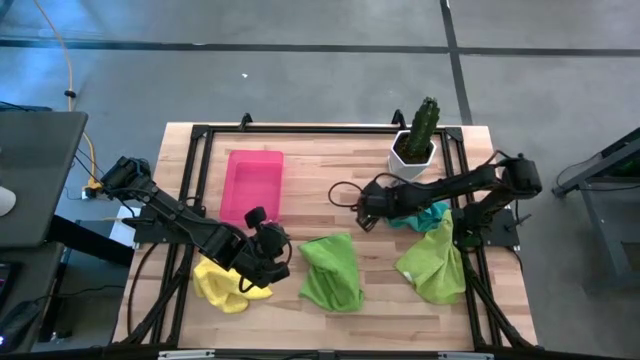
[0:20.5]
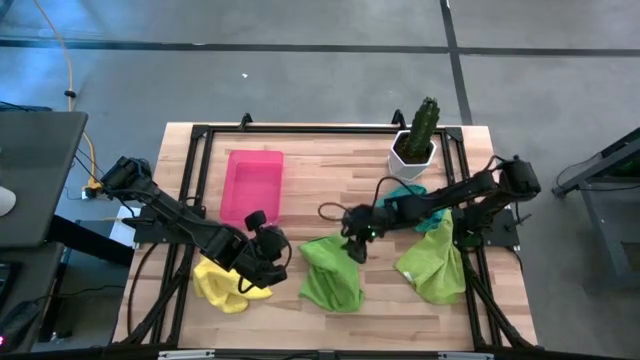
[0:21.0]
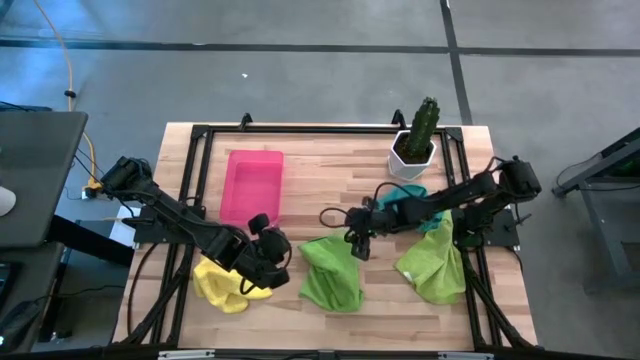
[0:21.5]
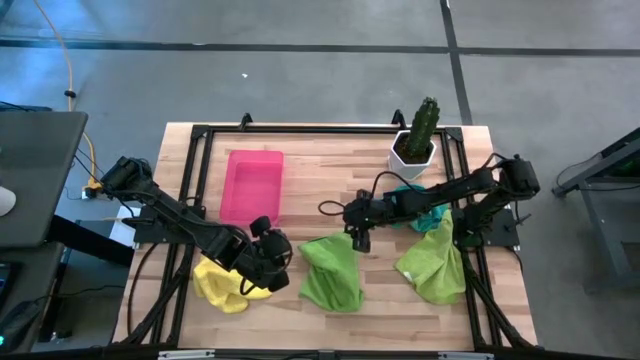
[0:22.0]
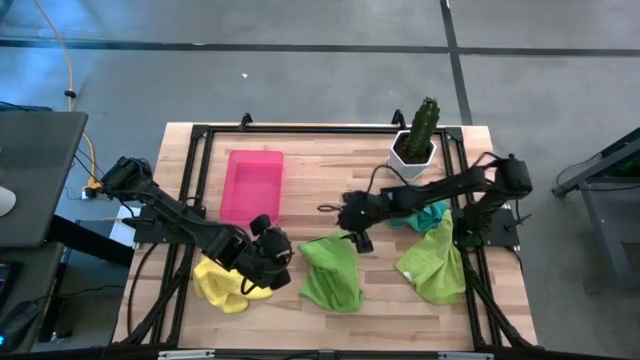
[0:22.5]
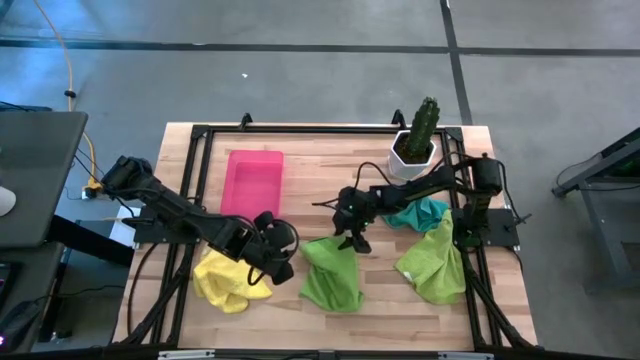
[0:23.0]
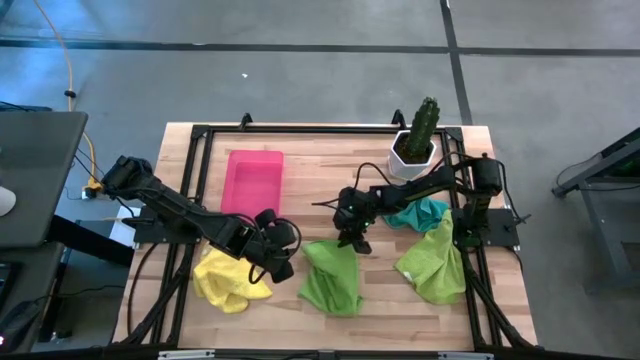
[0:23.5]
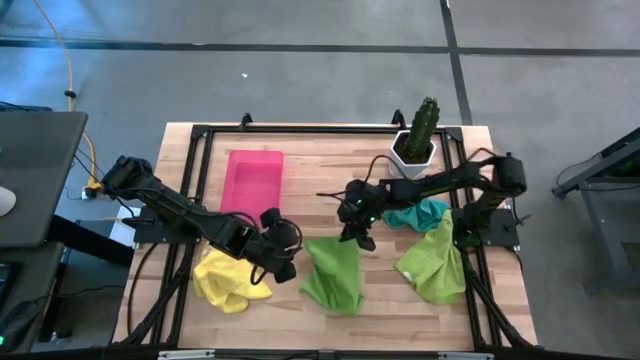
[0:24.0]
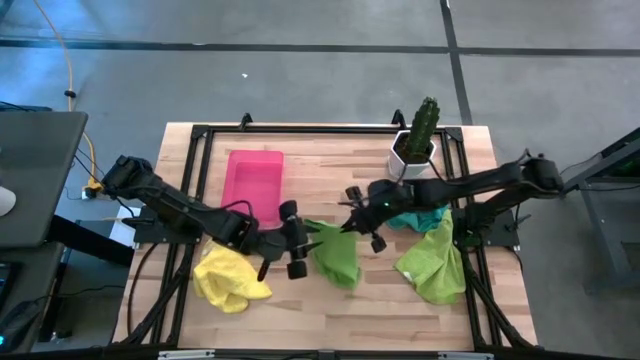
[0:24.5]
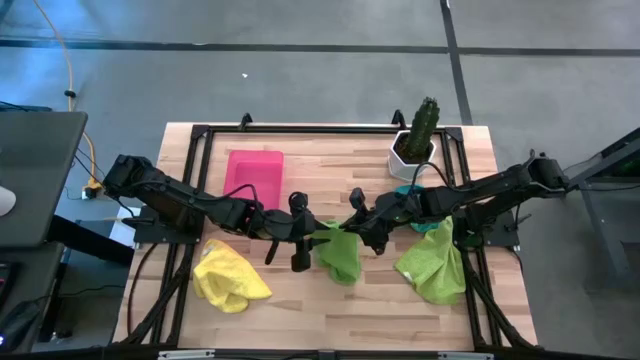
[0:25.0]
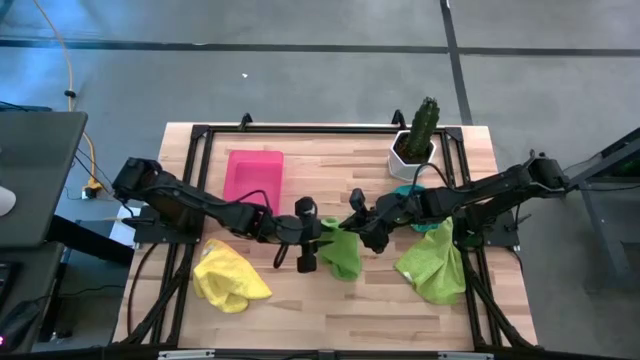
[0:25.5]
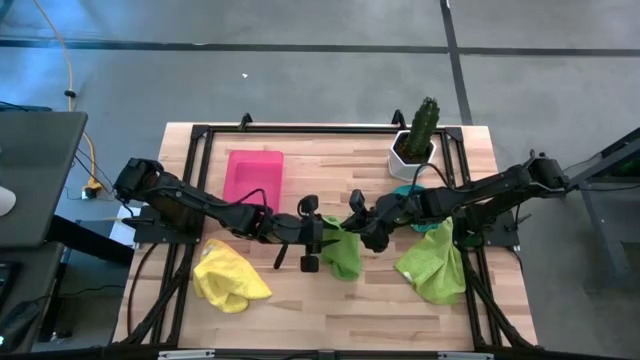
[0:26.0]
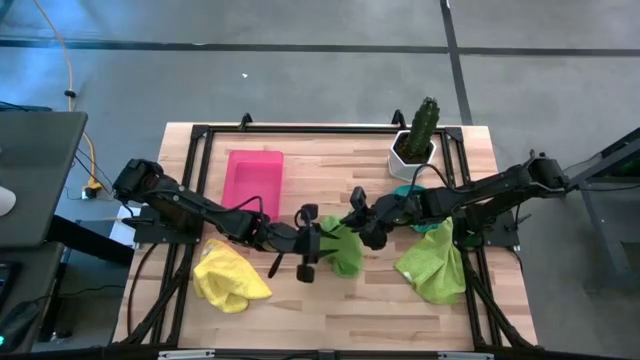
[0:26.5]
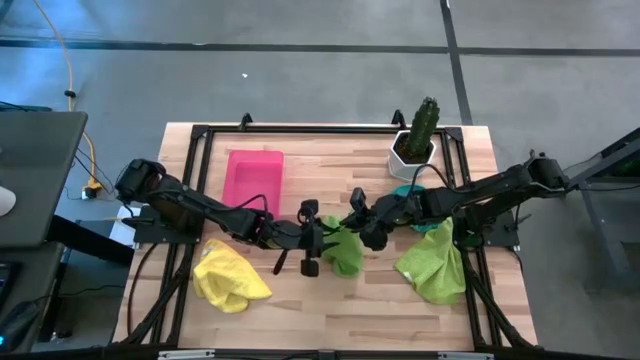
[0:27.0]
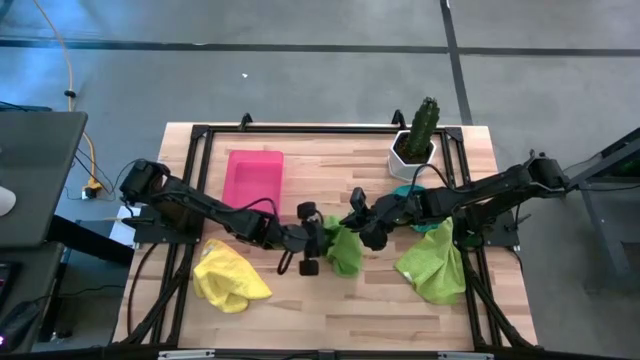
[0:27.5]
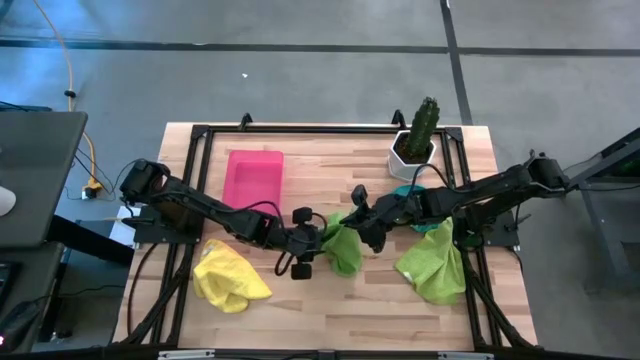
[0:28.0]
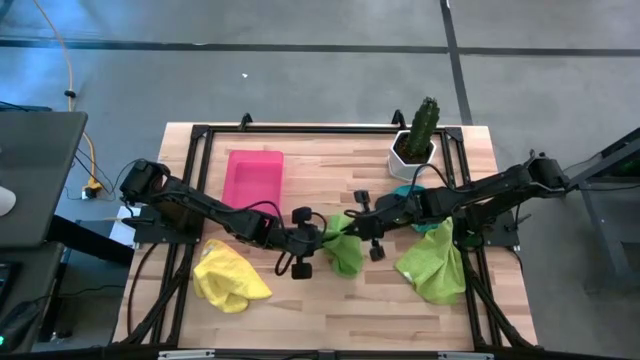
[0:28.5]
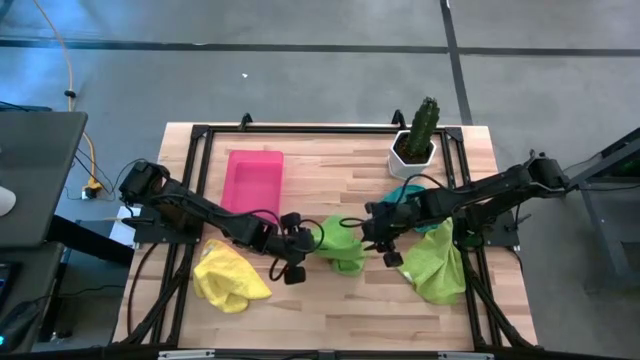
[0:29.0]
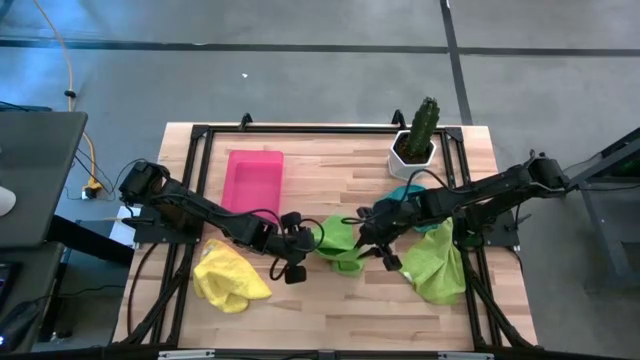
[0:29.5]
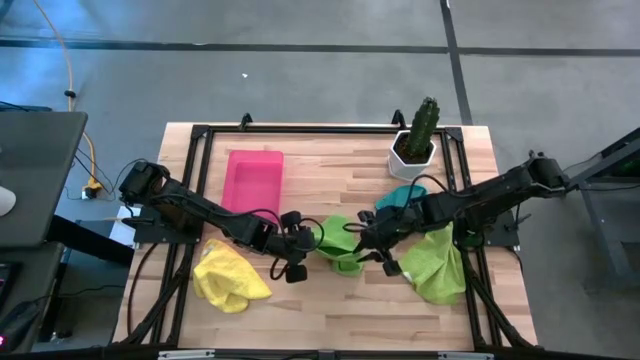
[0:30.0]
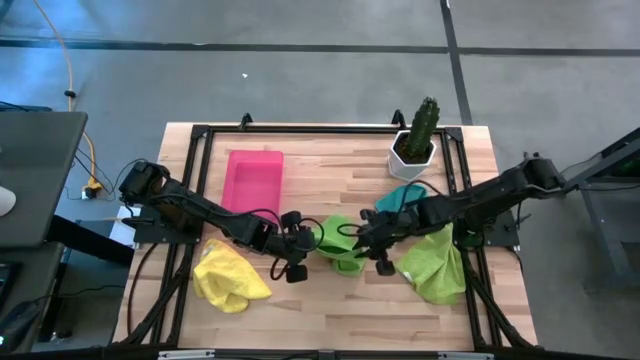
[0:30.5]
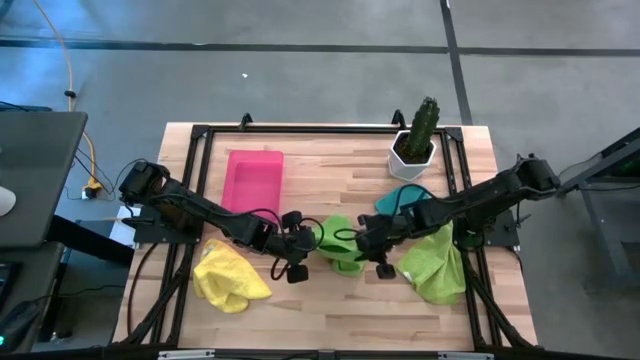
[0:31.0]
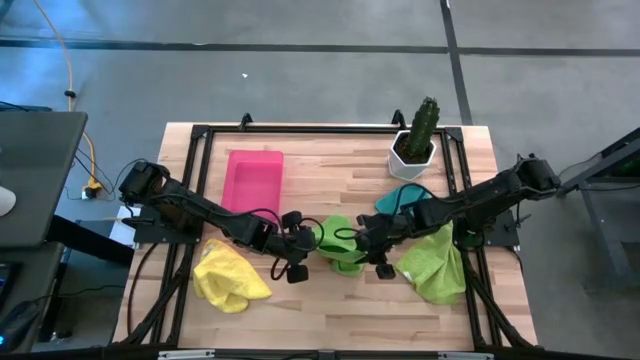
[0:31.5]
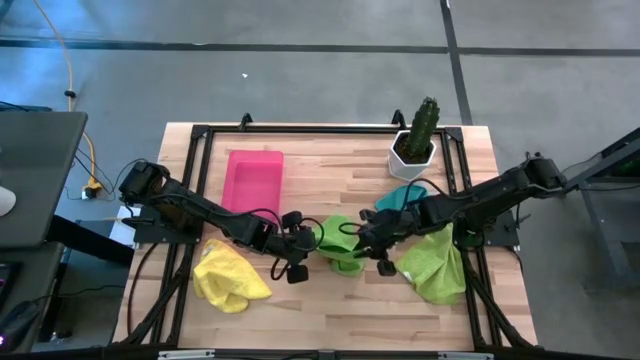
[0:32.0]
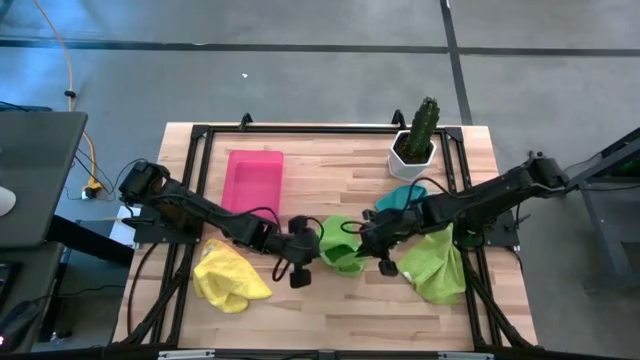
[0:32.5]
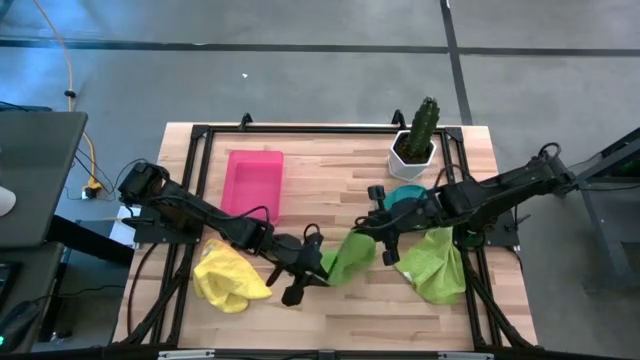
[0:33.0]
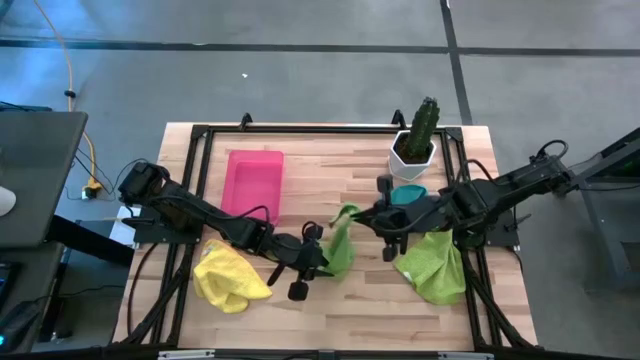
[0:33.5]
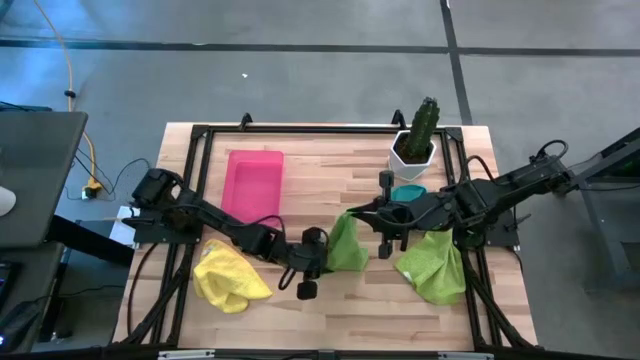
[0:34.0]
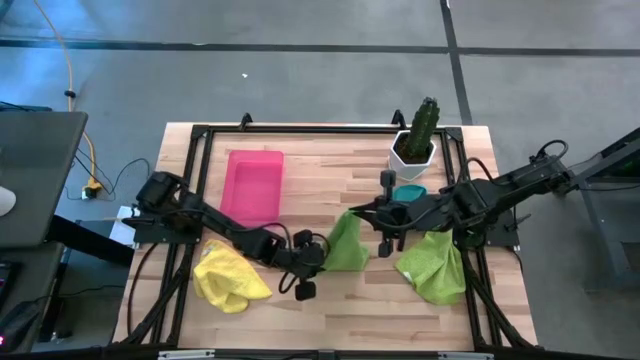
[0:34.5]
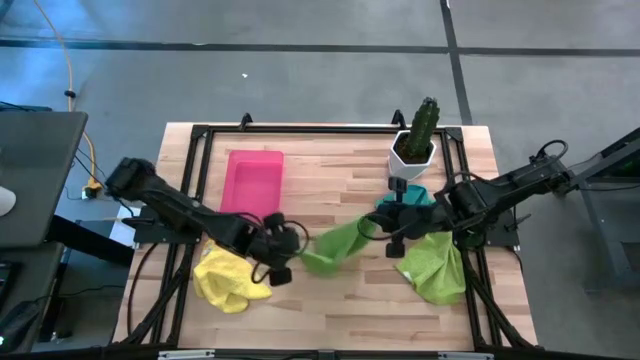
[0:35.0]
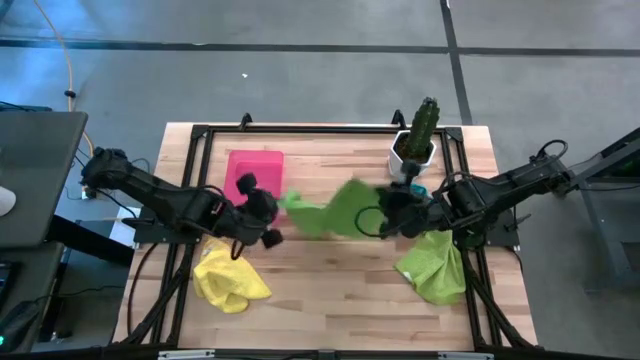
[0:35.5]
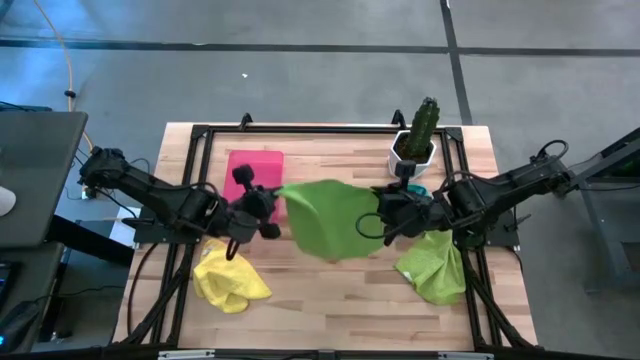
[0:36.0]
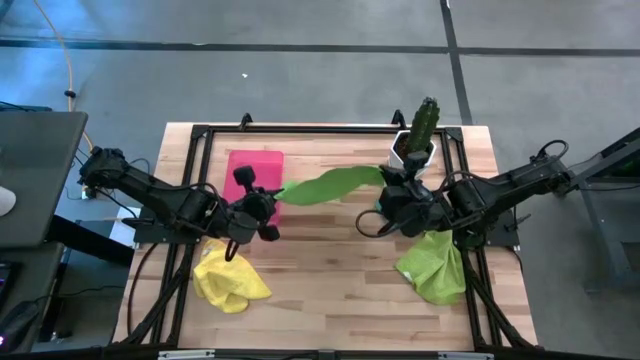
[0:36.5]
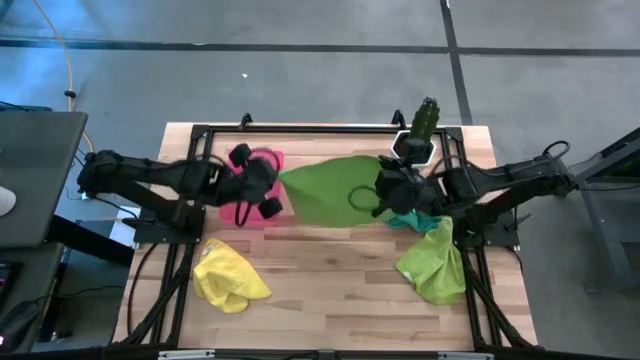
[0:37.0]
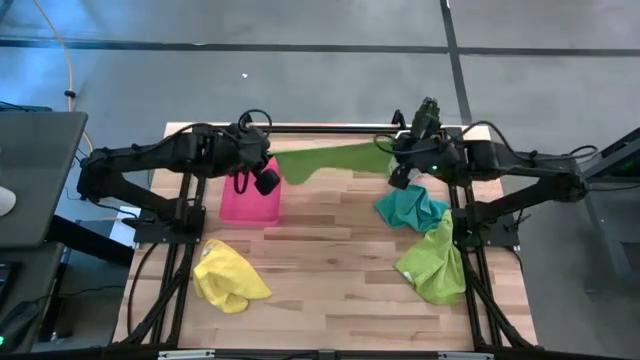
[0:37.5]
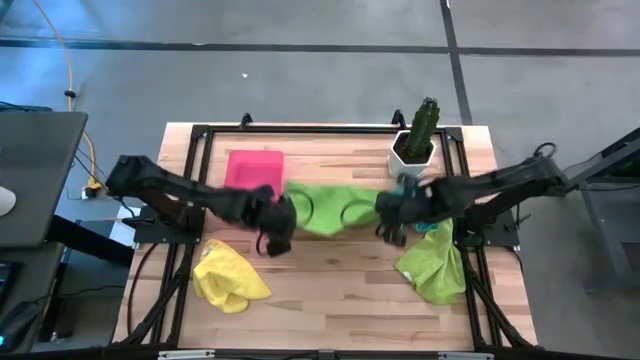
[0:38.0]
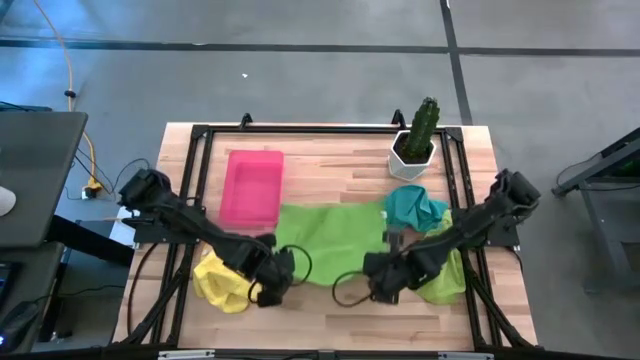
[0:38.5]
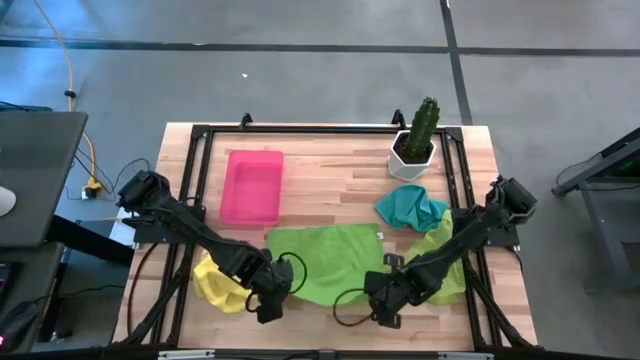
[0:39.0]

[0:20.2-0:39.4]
Task: Roll microfiber towels into tight, uniform cylinder then place into a basket
Roll the green microfiber cloth
